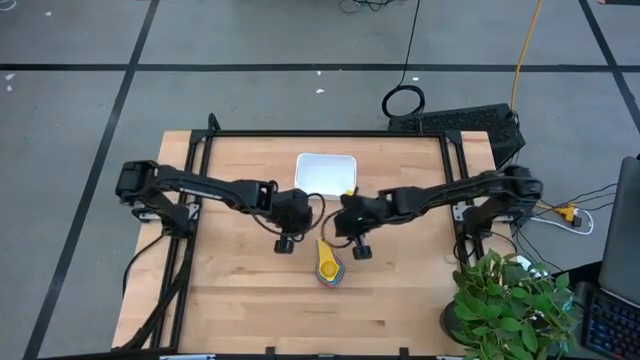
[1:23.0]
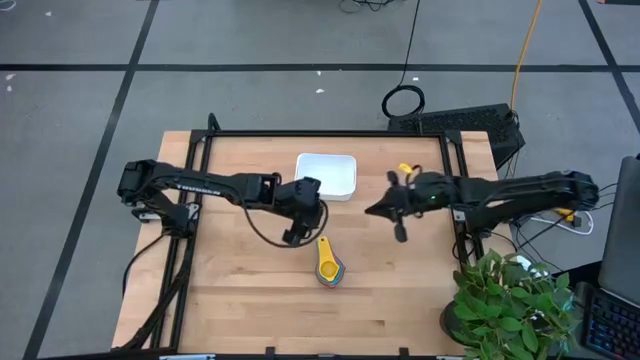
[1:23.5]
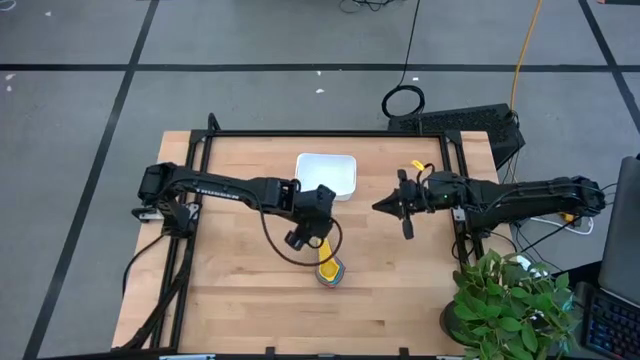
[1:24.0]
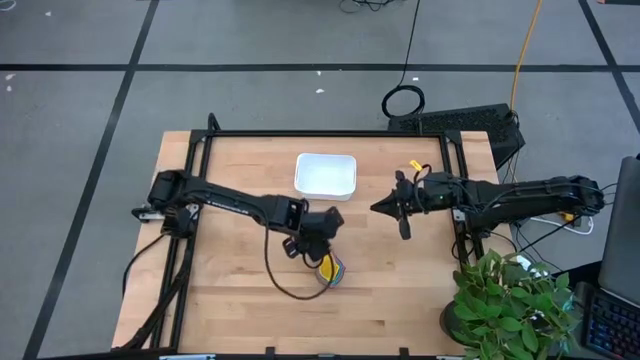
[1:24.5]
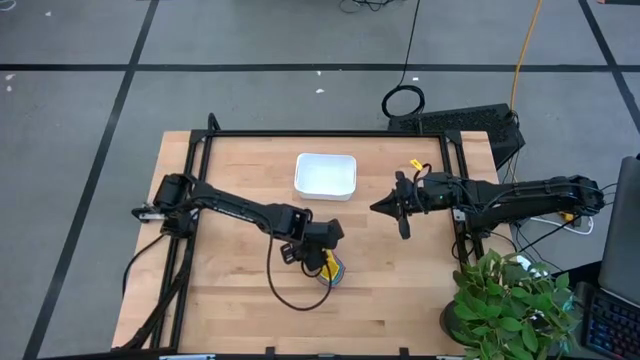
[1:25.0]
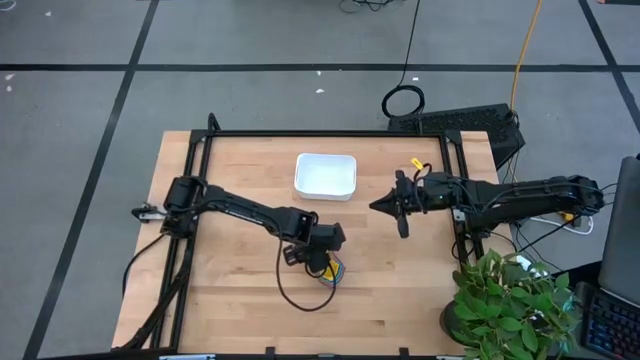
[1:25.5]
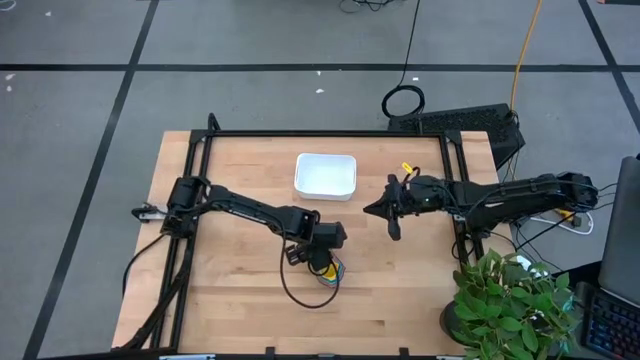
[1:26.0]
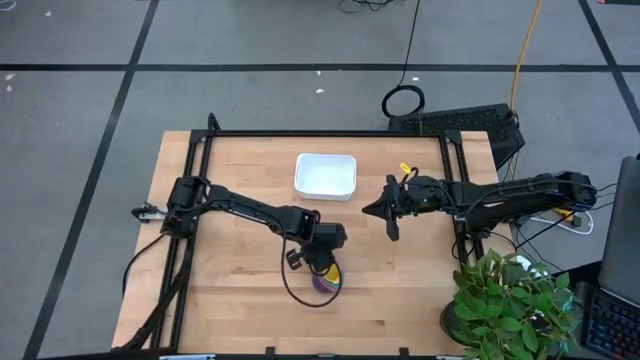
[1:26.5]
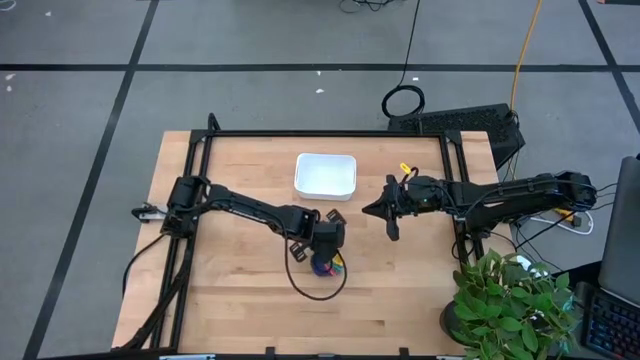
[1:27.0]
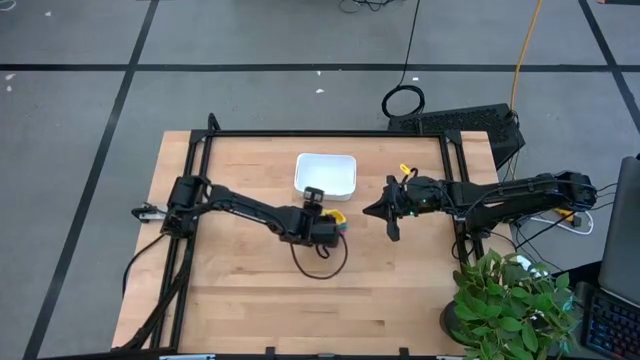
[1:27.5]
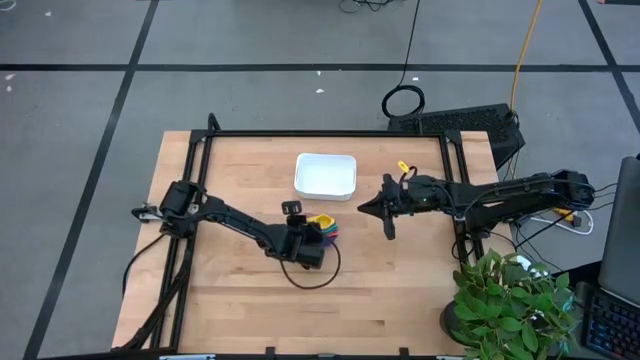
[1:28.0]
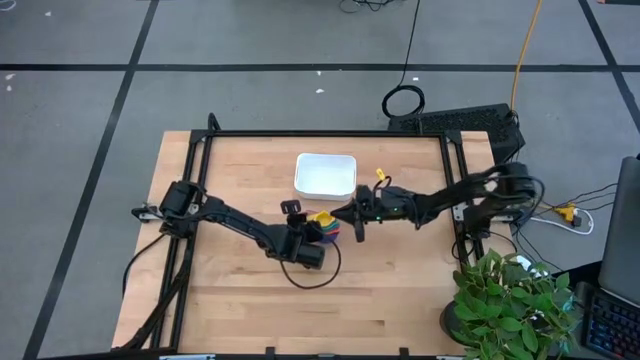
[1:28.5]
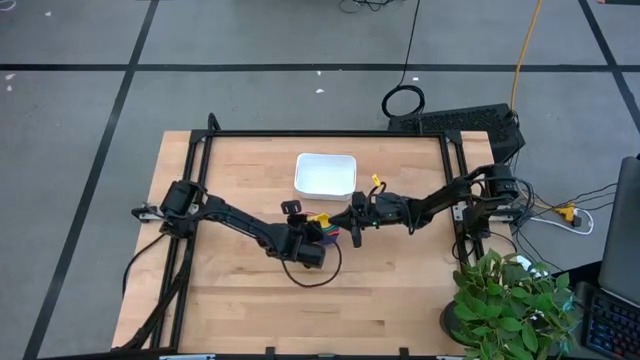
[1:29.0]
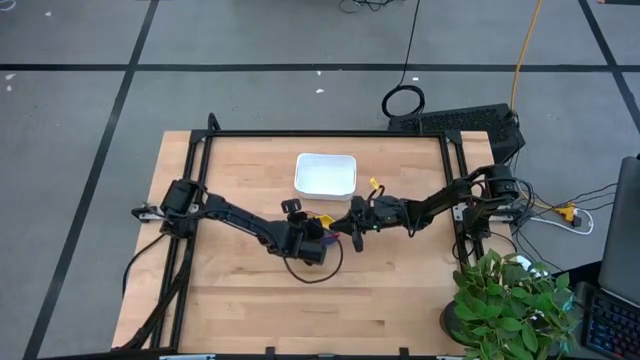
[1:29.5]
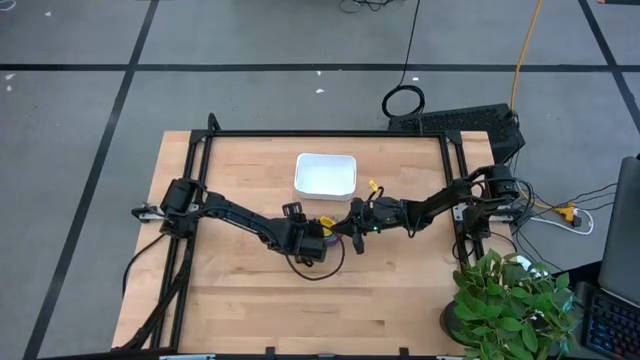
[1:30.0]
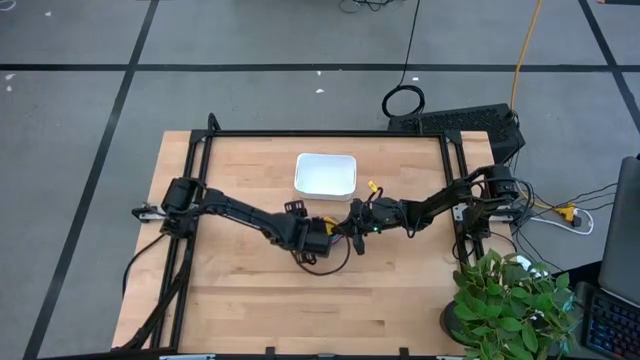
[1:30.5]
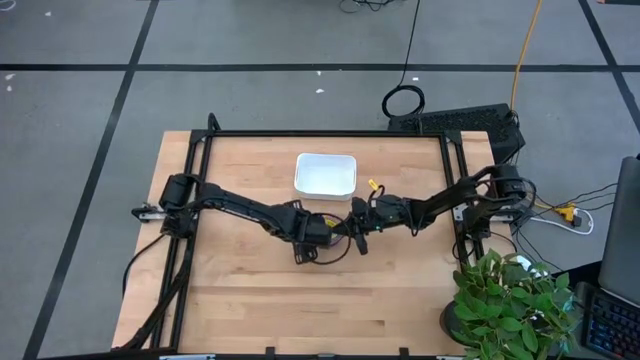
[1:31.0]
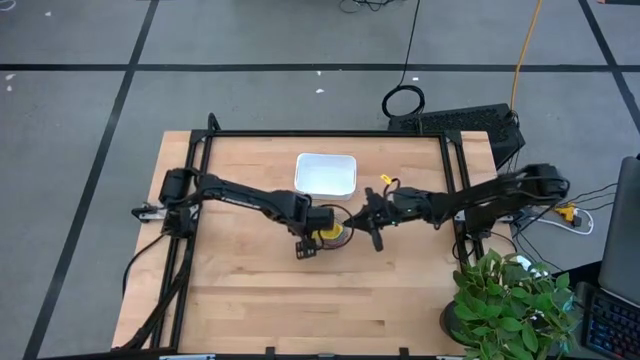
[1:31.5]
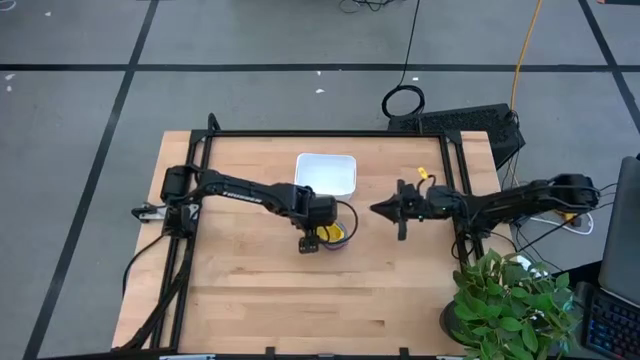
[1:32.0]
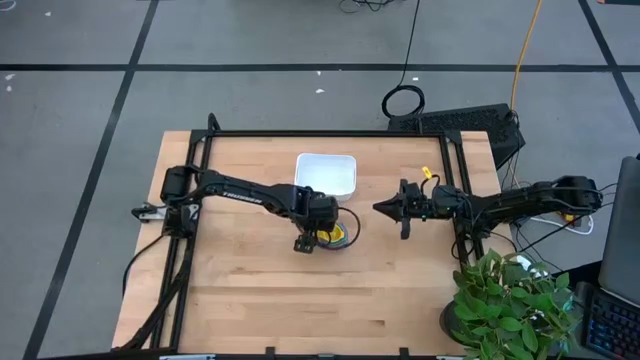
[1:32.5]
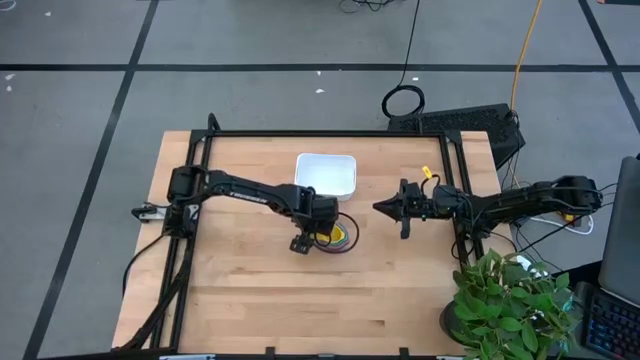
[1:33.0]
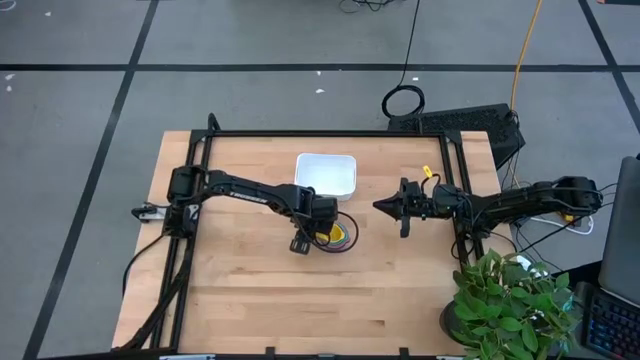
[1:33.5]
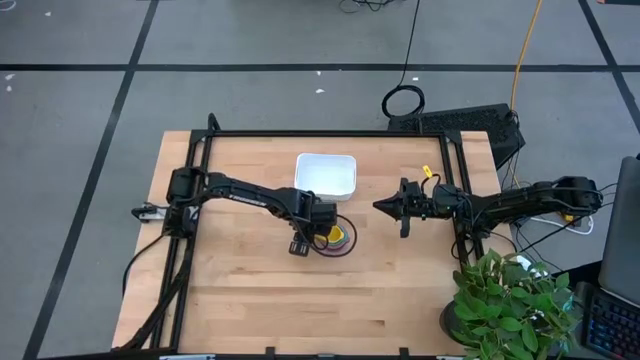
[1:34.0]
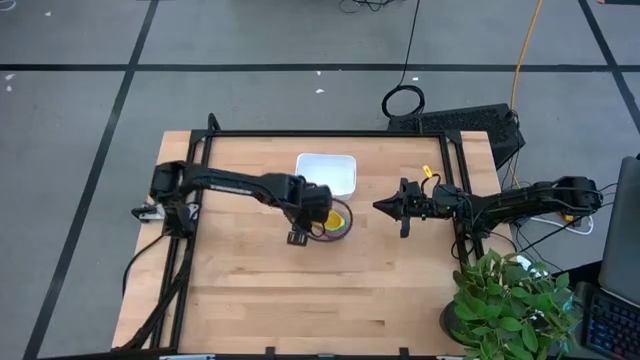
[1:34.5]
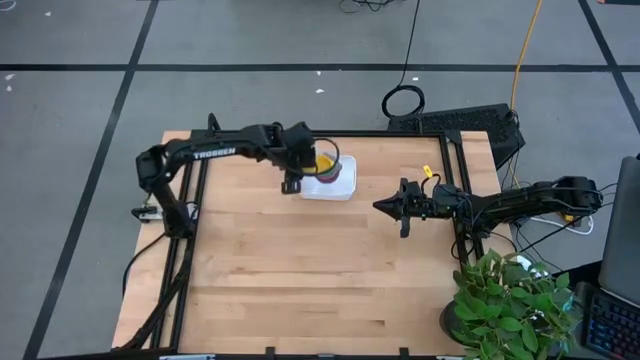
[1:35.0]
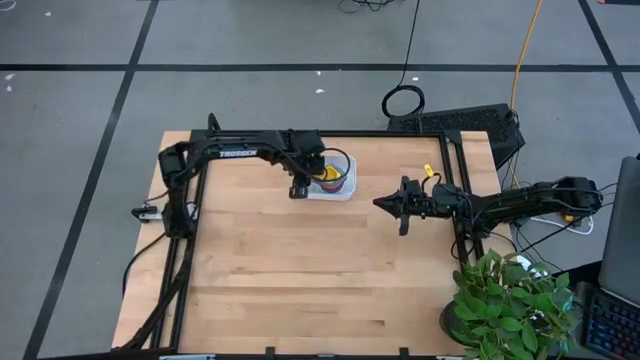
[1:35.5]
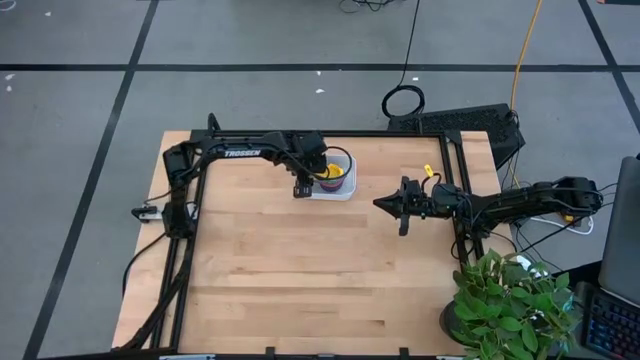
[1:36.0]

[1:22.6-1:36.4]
Task: Nest measuring cups in basket
Put the stacked colored measuring cups into the white bin

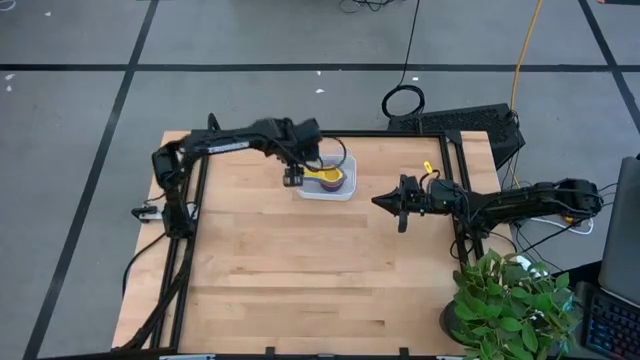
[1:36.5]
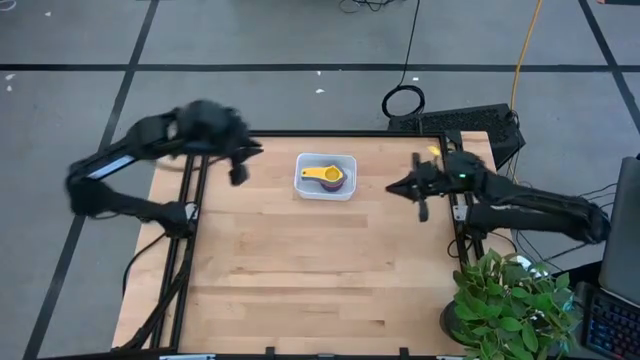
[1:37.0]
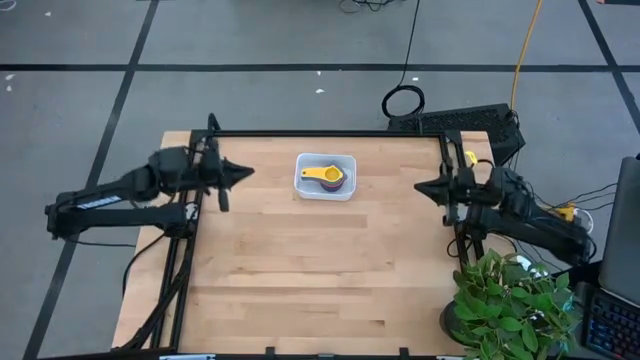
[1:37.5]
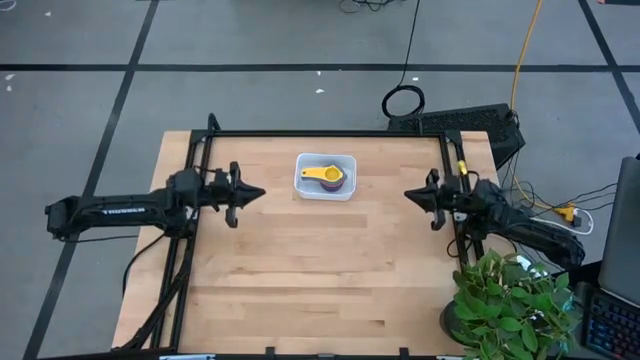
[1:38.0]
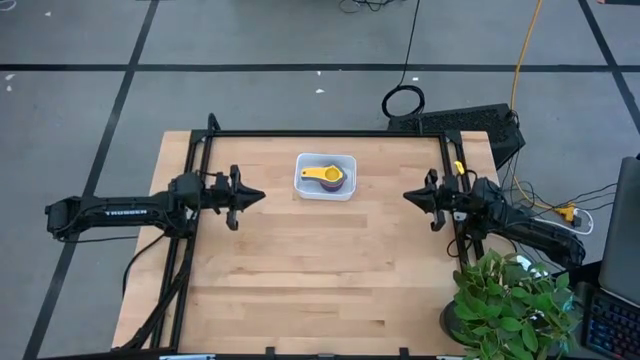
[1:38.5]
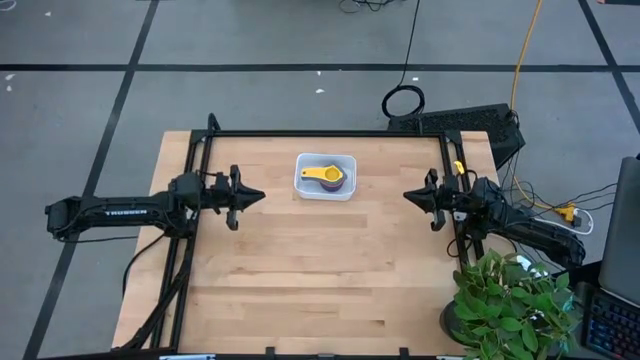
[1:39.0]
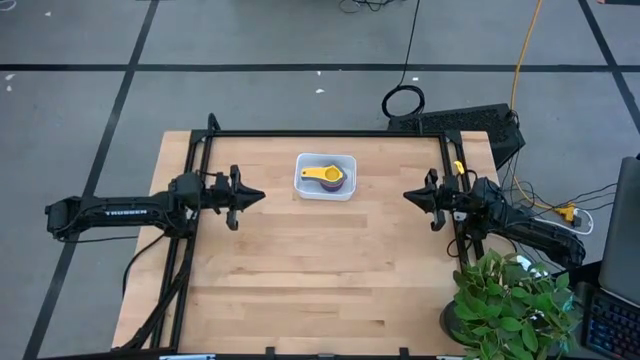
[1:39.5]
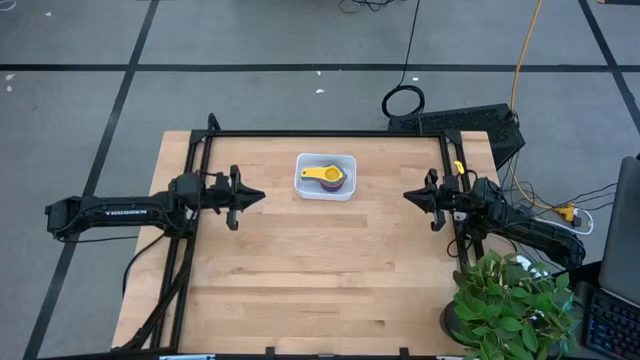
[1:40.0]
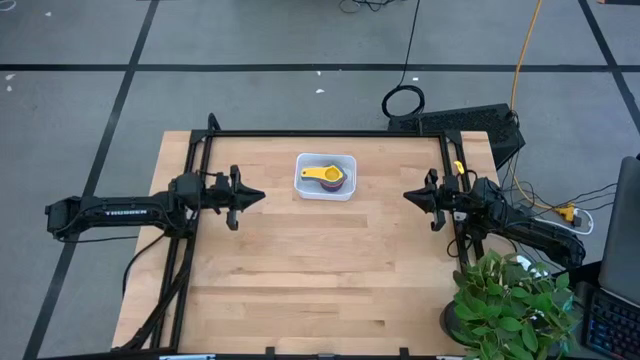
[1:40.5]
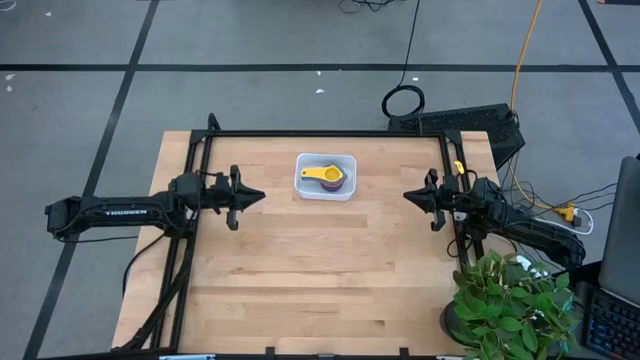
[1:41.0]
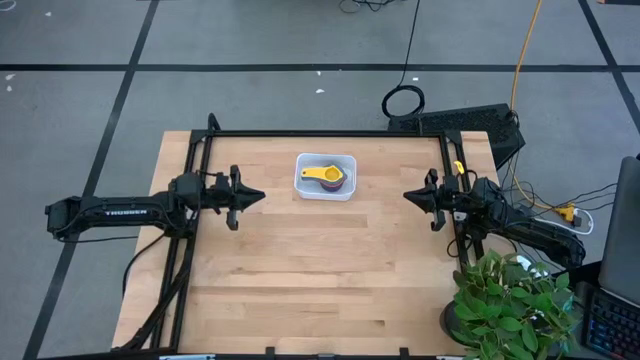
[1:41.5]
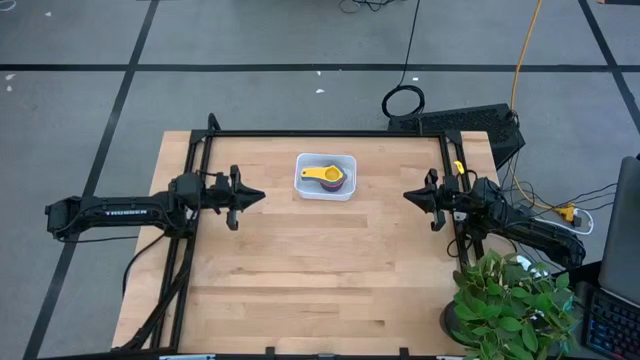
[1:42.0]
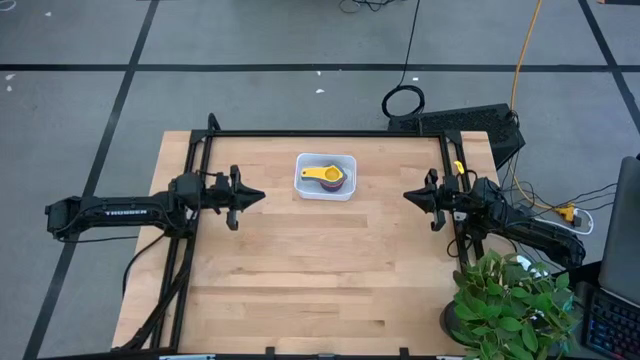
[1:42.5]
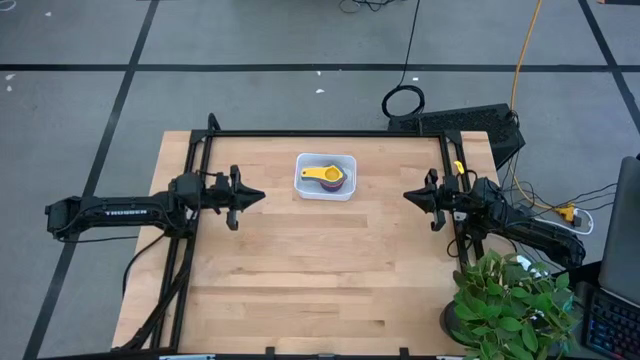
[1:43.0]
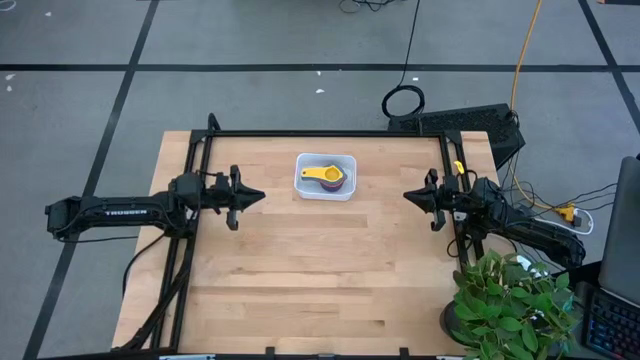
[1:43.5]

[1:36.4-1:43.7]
Return to Home Position

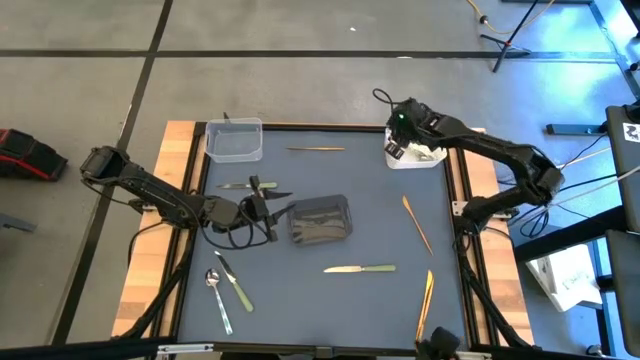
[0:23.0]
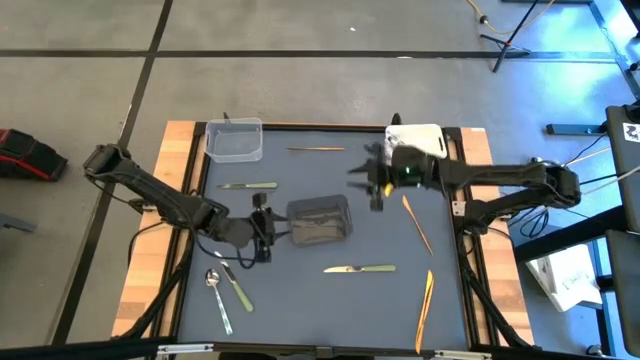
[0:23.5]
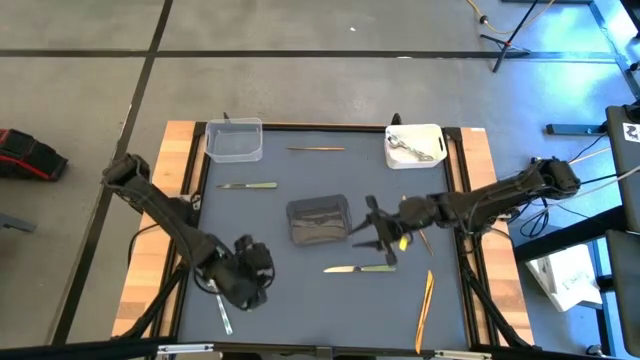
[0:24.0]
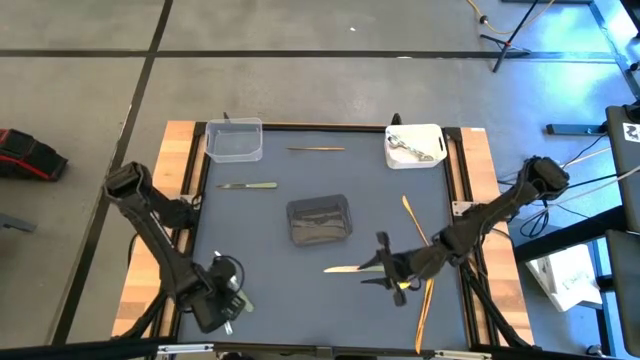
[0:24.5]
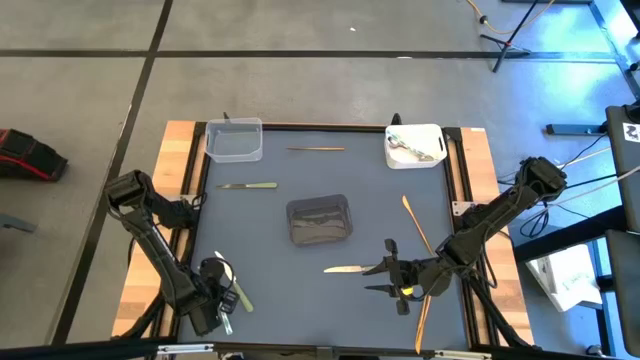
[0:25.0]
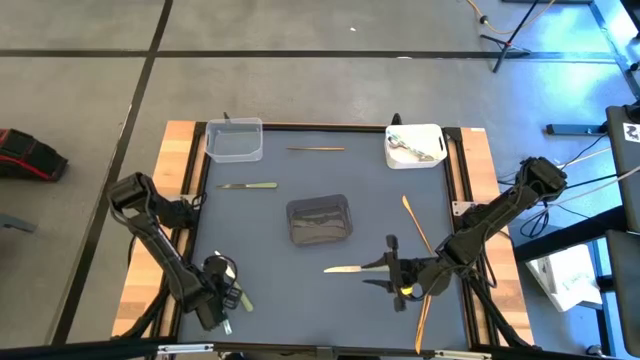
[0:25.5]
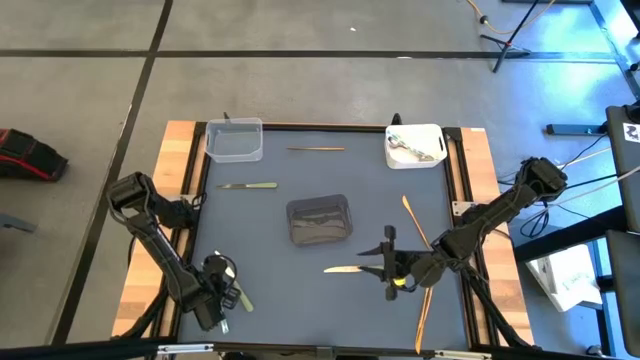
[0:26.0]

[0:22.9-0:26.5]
Task: Sort silverware by color (type)
Put the white green spoon into the white bin
